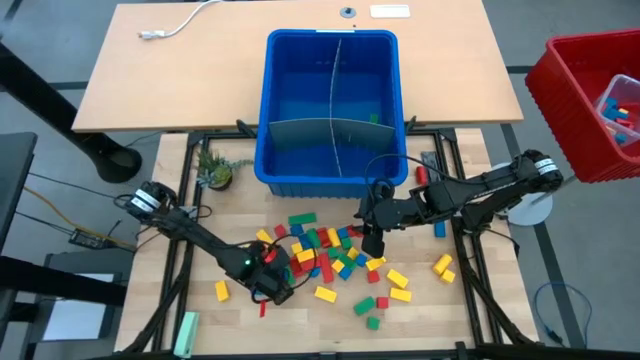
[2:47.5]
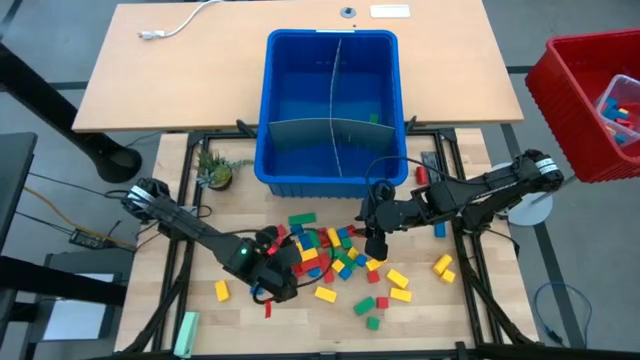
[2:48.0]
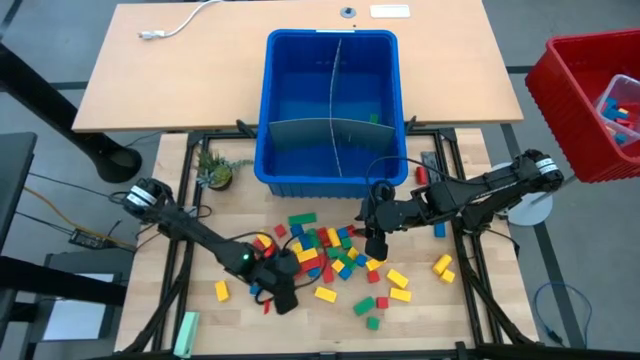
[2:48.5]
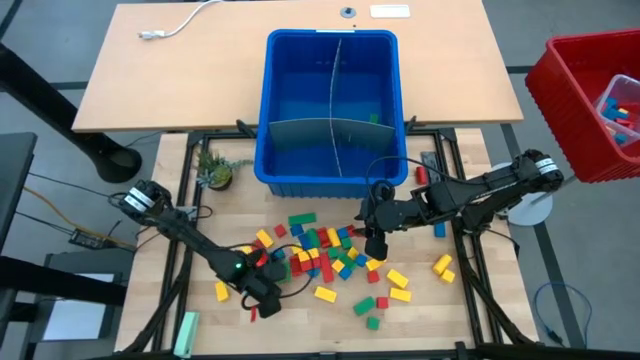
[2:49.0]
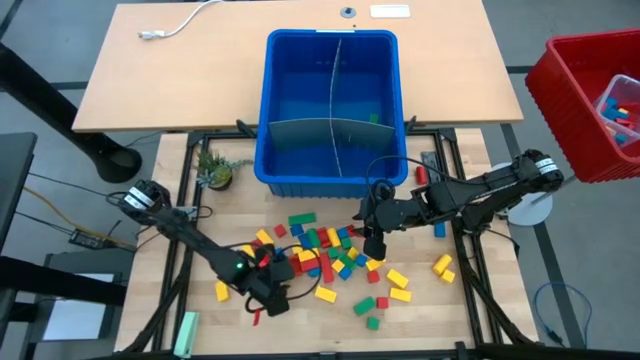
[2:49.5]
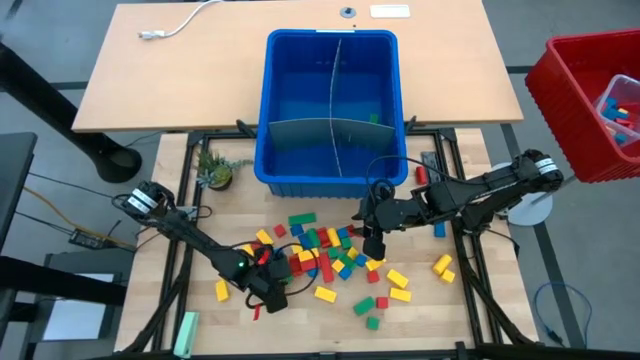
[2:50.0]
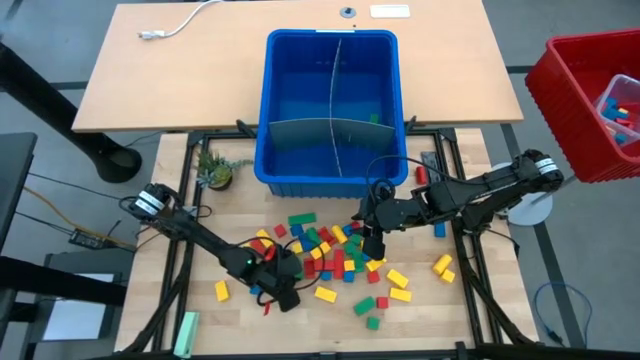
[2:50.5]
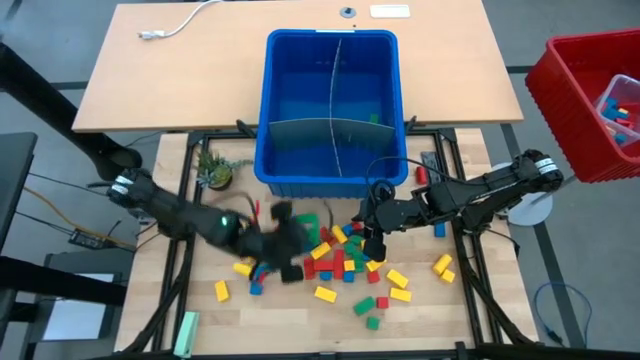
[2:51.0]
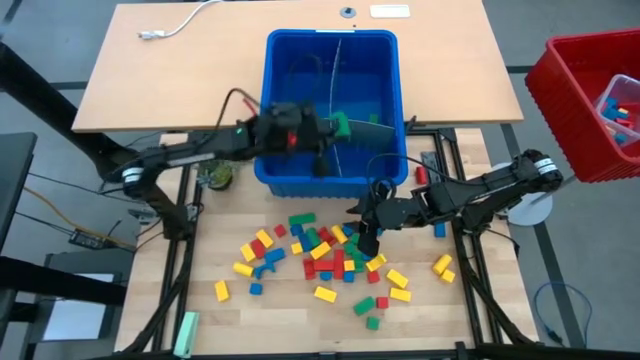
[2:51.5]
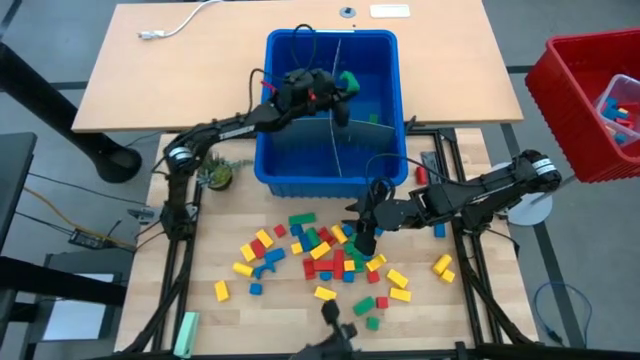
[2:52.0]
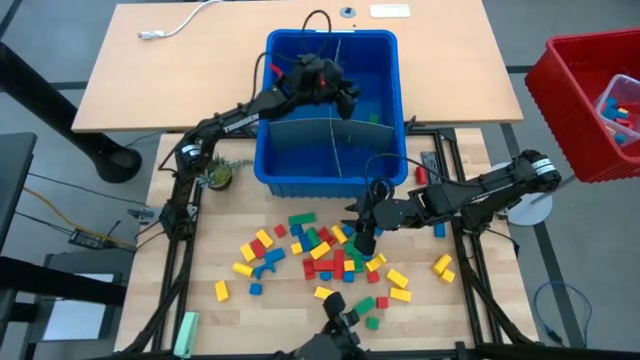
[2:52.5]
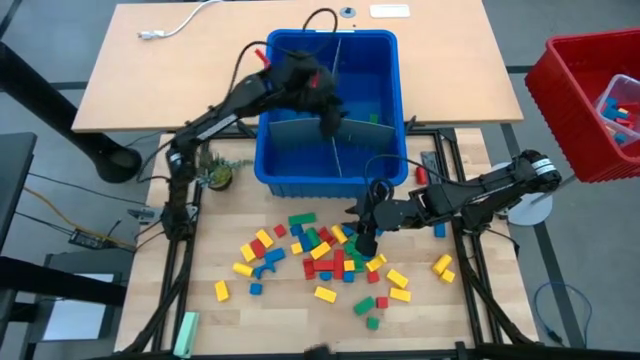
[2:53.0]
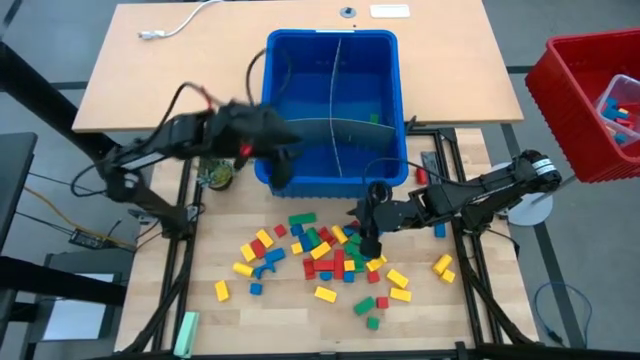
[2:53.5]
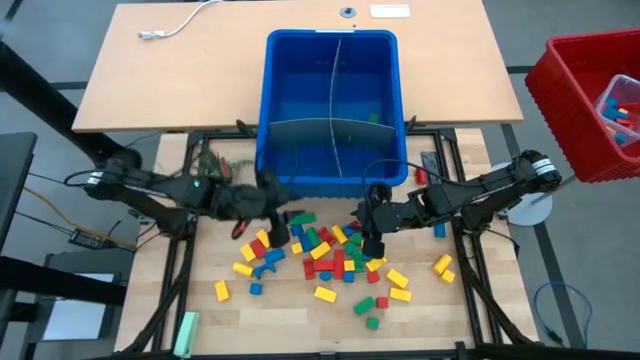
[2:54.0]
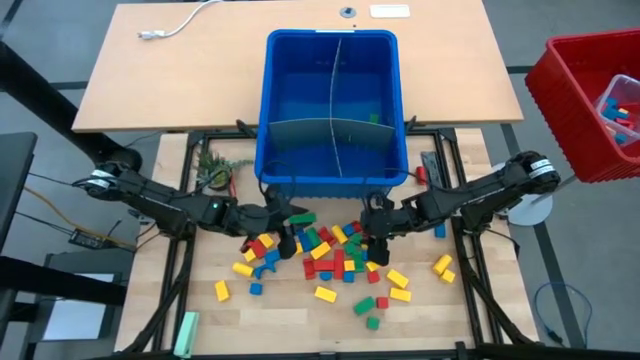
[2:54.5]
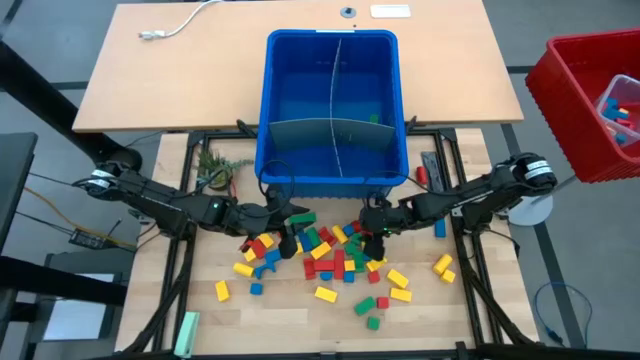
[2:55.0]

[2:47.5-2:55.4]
Task: Sort blocks
Put the green block with the other green blocks into the blue bin

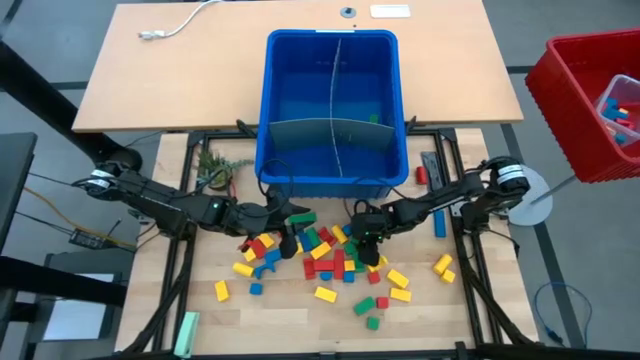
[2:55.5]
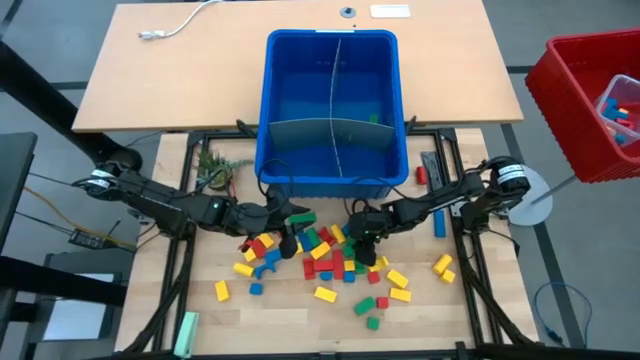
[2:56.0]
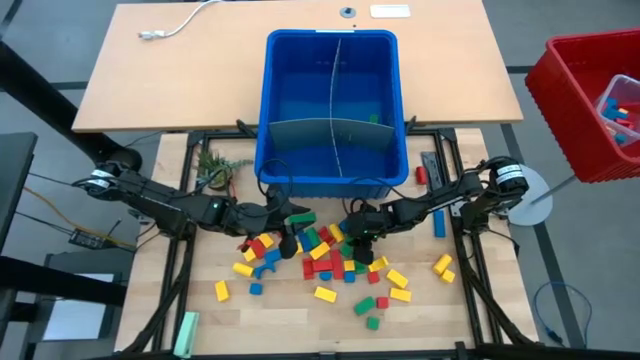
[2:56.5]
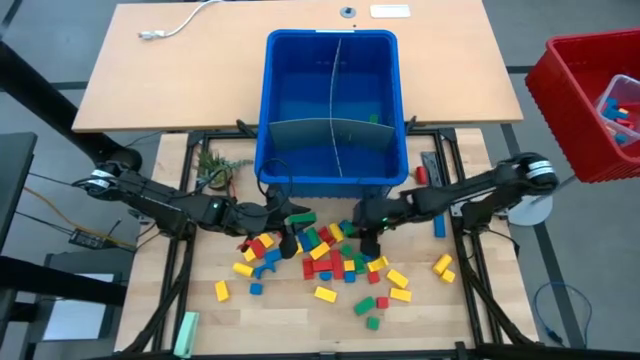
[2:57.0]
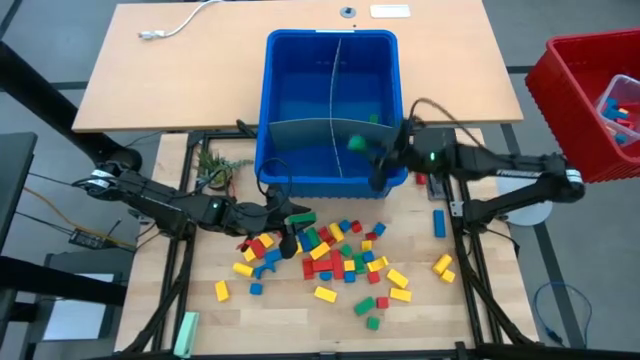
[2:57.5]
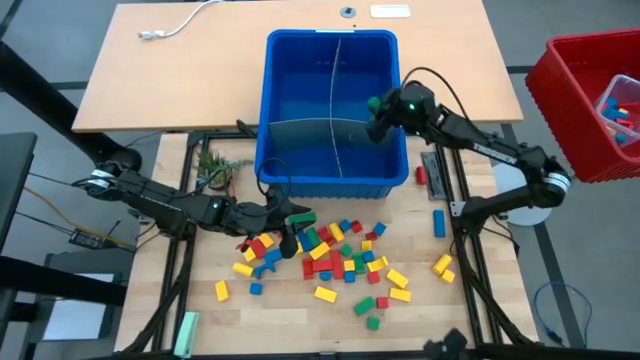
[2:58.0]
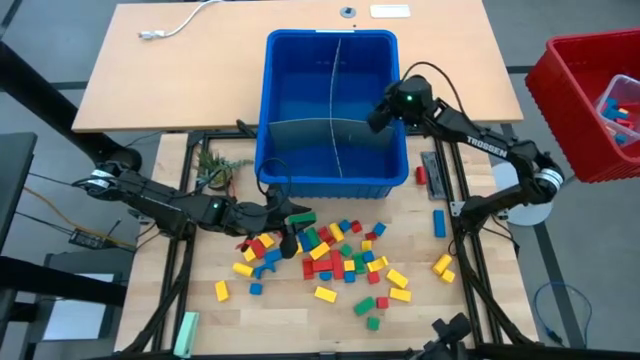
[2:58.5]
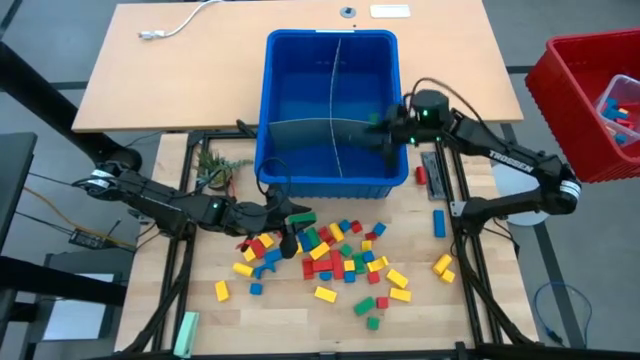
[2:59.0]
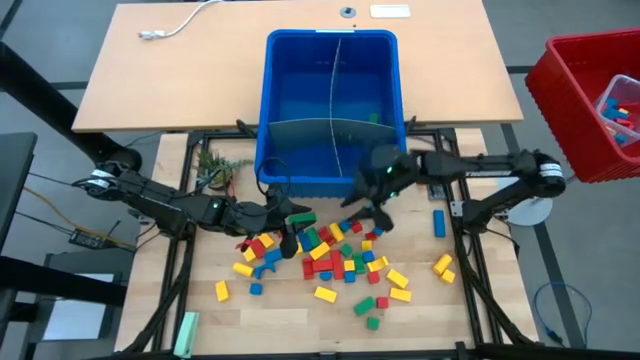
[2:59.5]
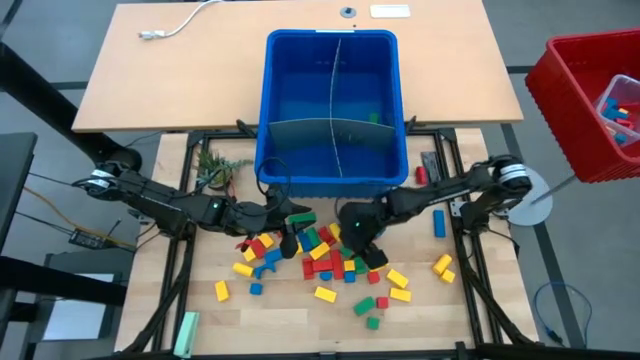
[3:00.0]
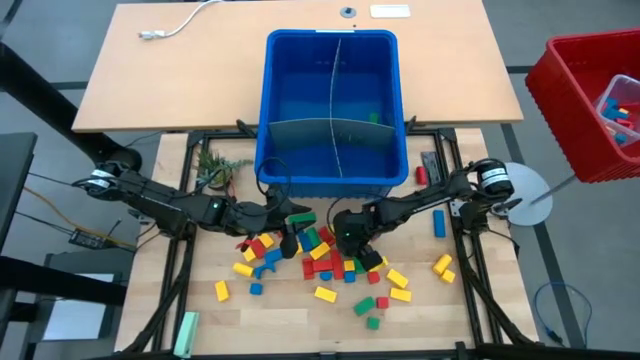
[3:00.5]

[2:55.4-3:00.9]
Put the green block with the other green blocks into the blue bin

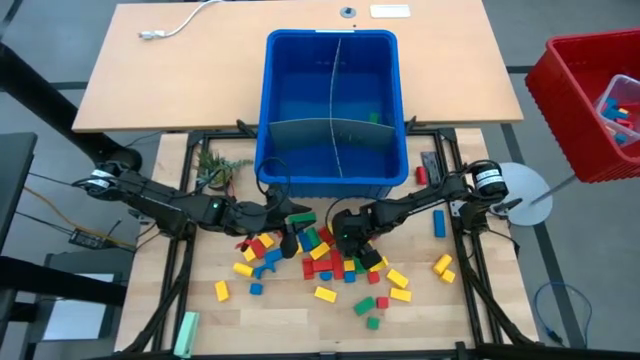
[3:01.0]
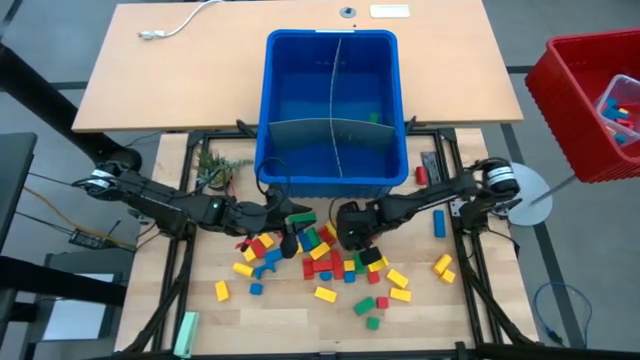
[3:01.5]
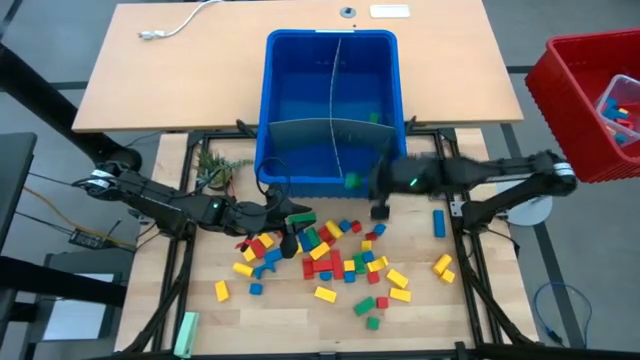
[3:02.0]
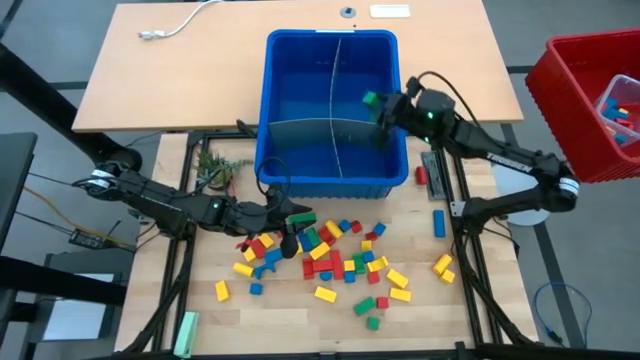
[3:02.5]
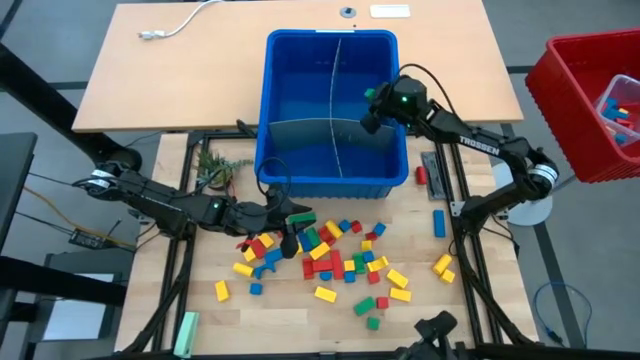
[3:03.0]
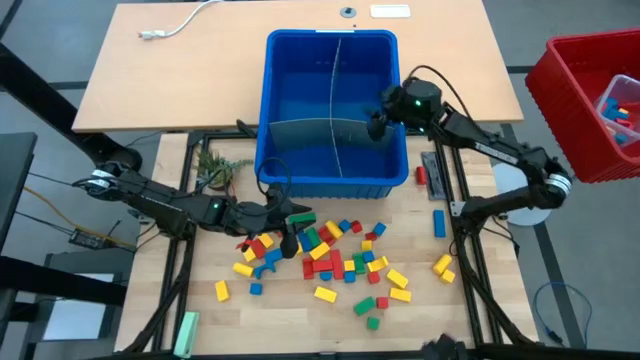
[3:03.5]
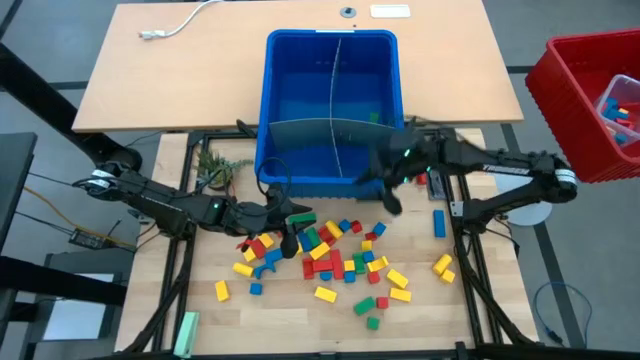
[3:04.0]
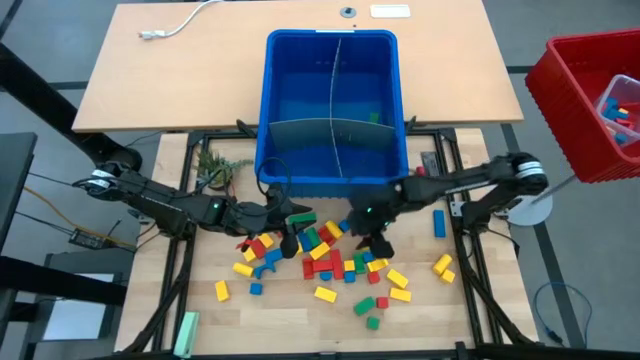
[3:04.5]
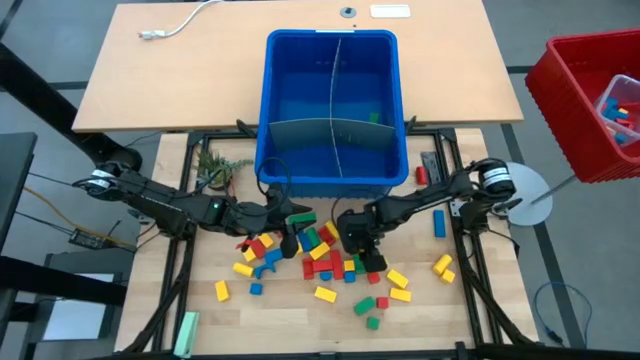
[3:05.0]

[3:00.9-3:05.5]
Put the green block with the other green blocks into the blue bin

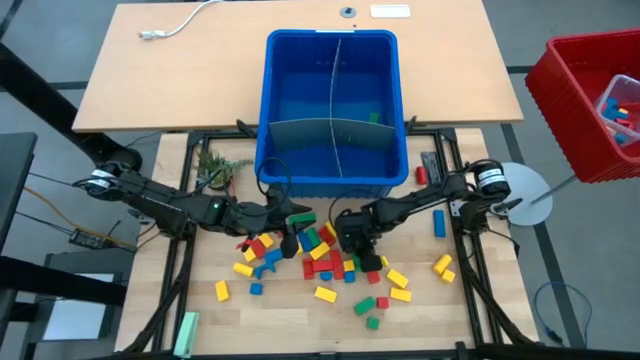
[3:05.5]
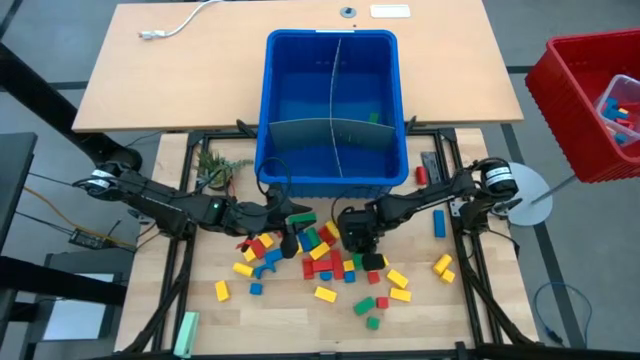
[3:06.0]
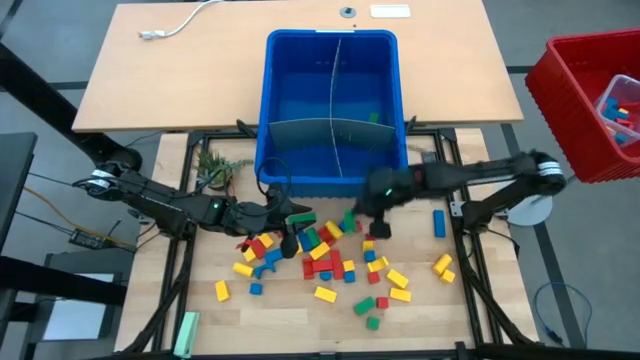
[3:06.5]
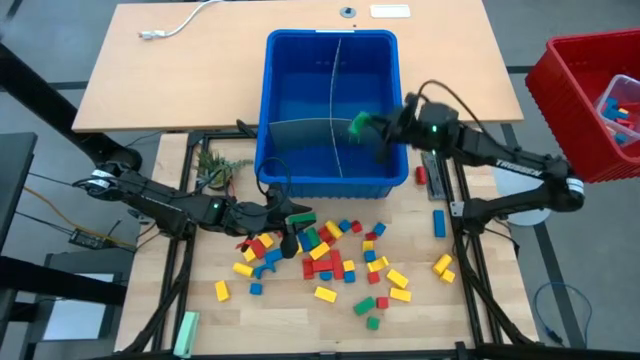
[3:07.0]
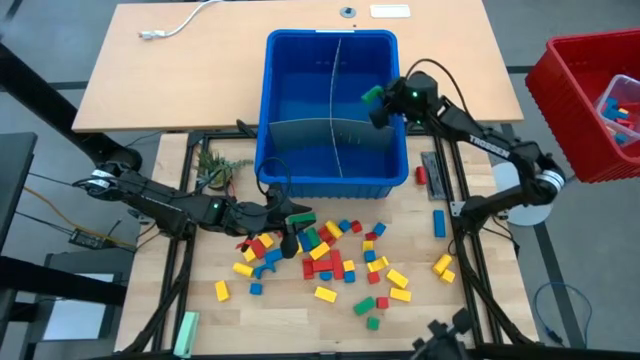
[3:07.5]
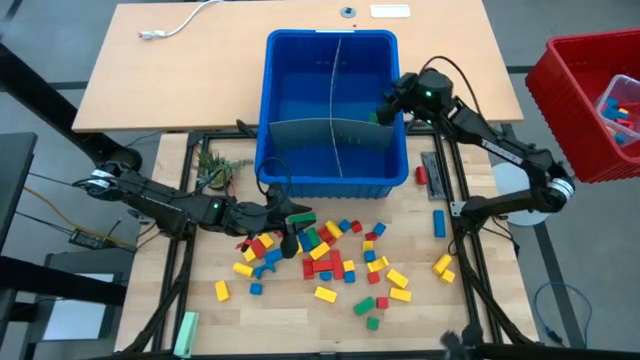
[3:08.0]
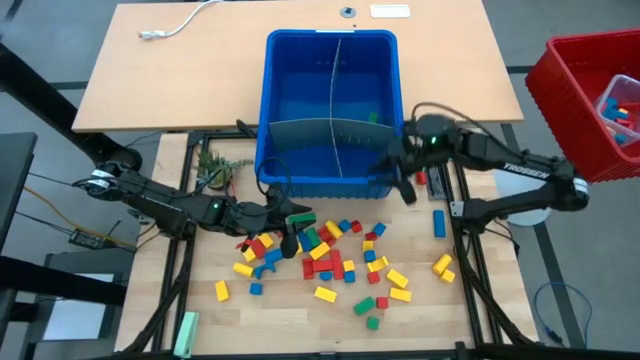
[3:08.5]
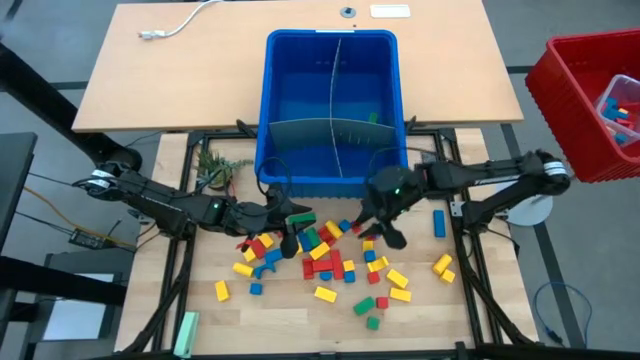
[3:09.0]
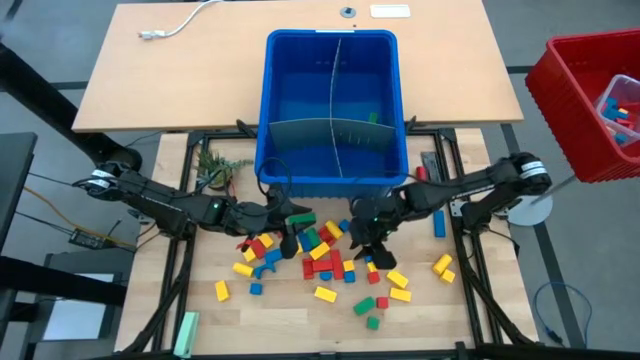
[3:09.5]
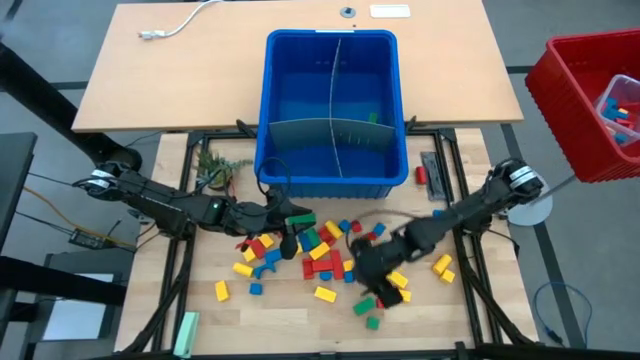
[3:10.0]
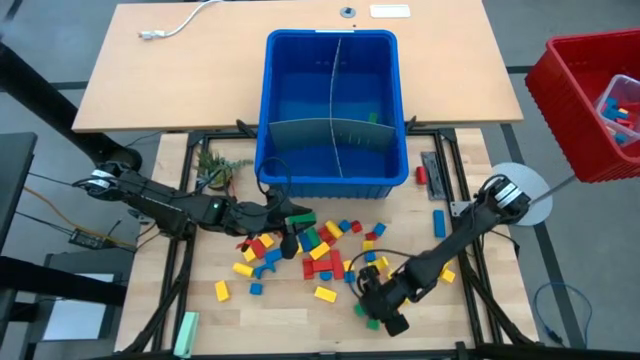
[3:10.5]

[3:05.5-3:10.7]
Put the green block with the other green blocks into the blue bin
